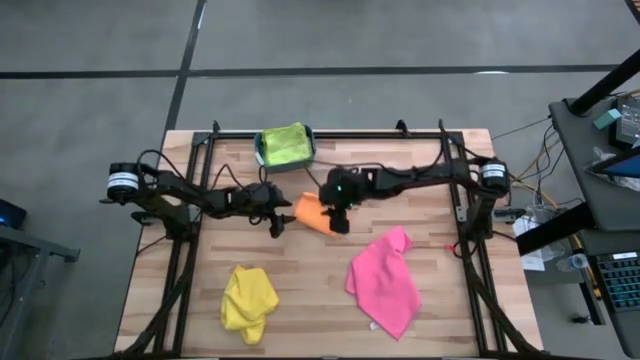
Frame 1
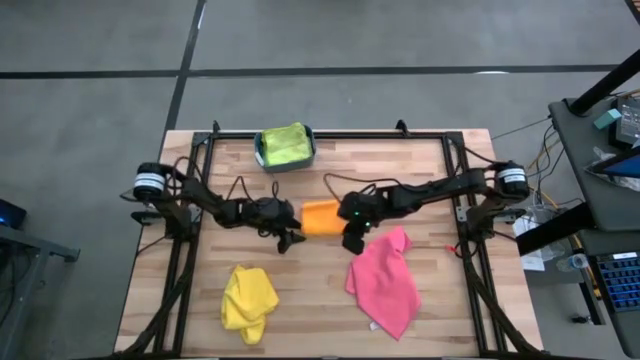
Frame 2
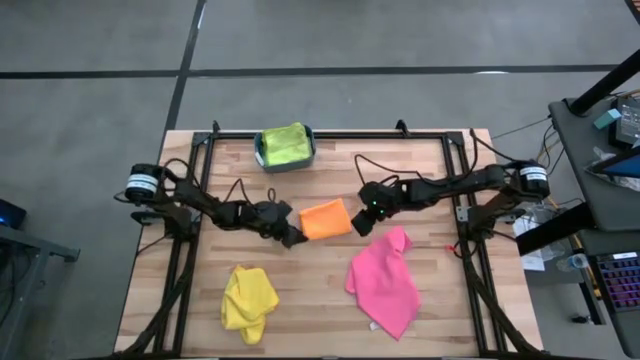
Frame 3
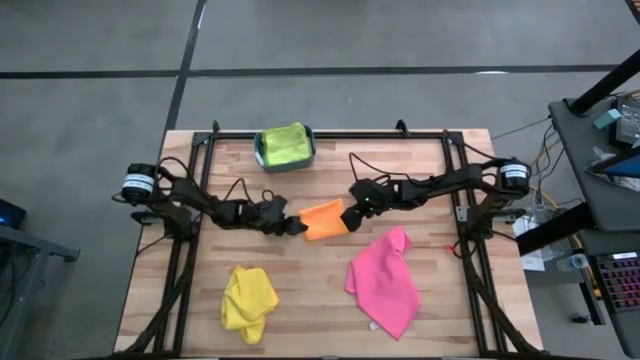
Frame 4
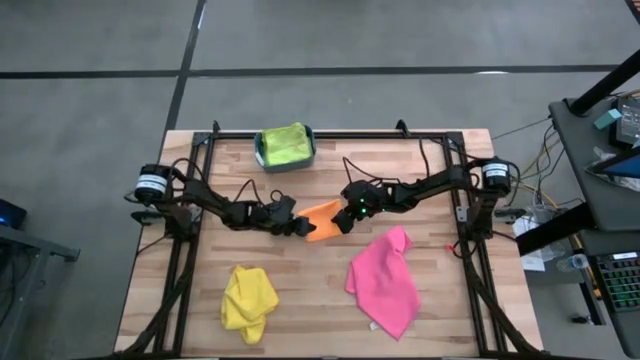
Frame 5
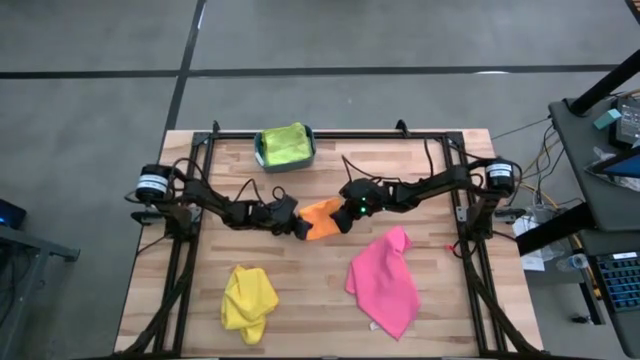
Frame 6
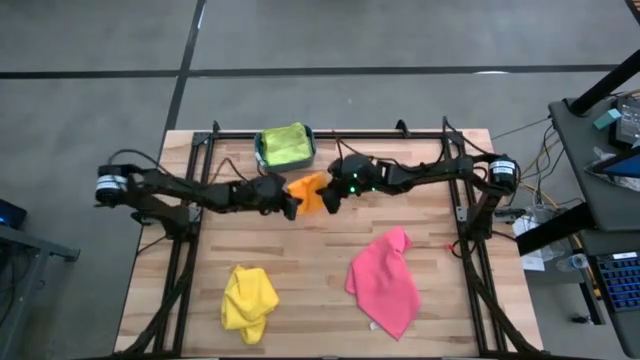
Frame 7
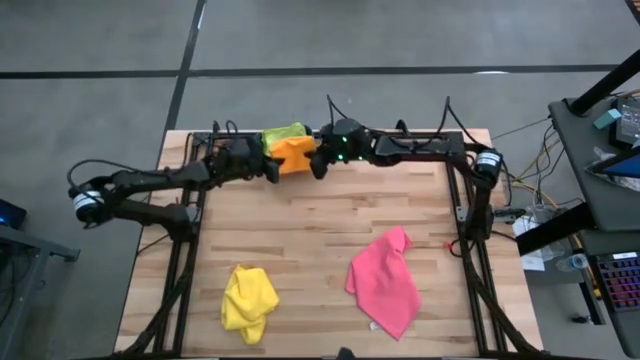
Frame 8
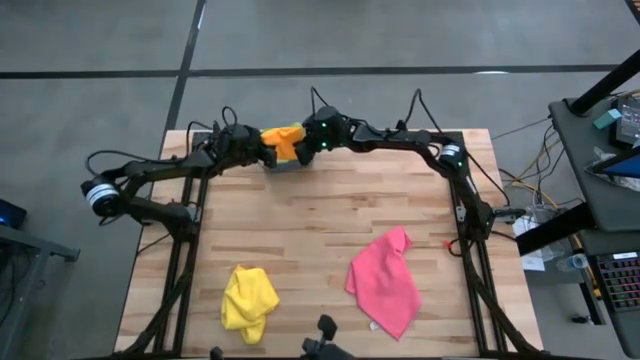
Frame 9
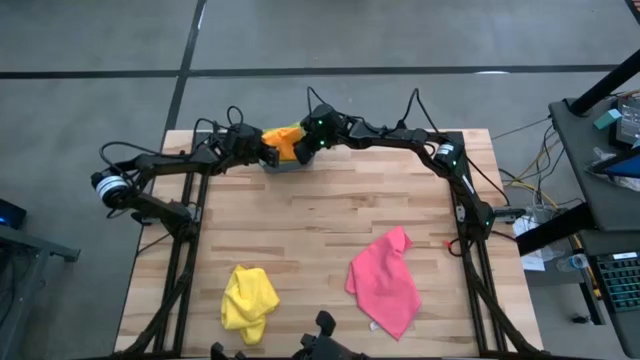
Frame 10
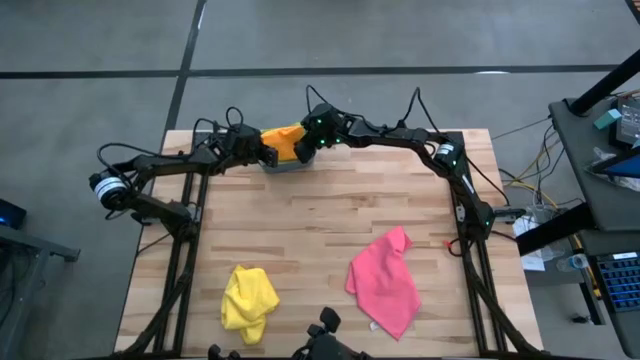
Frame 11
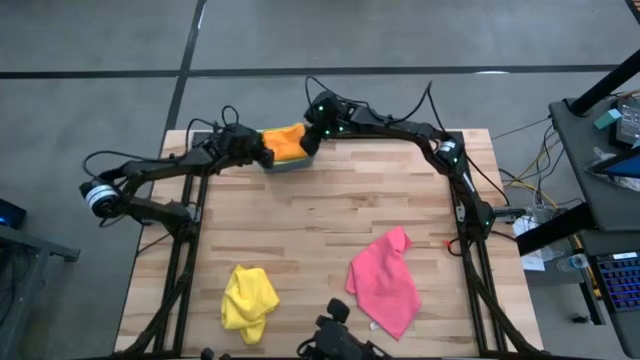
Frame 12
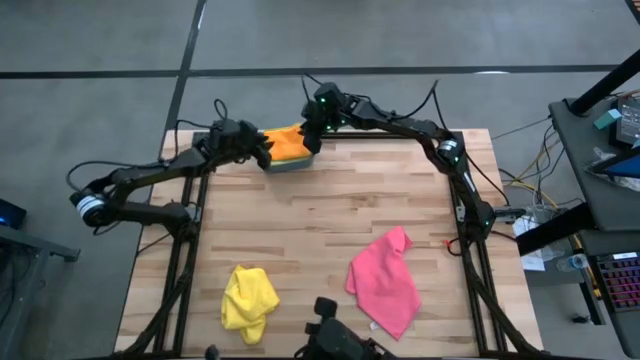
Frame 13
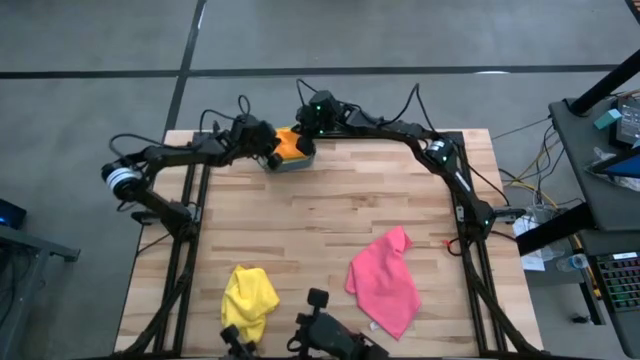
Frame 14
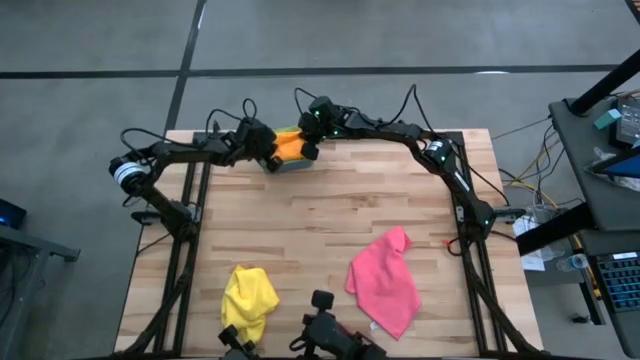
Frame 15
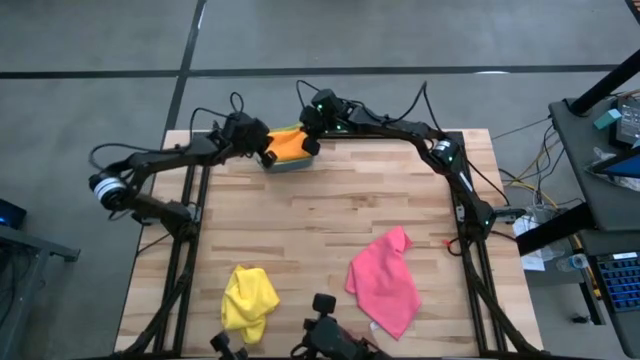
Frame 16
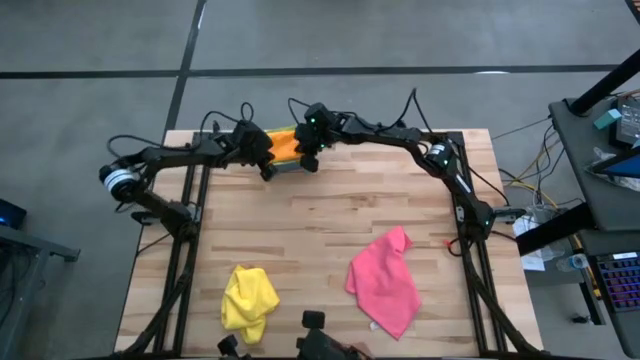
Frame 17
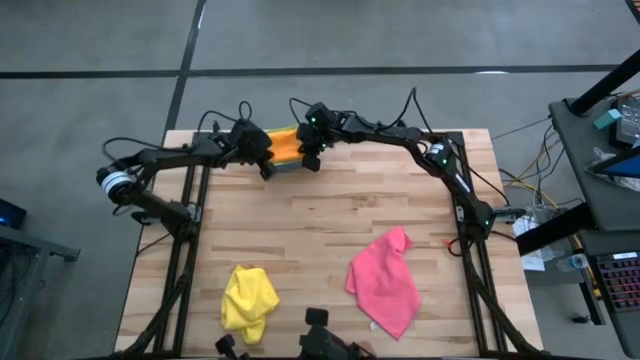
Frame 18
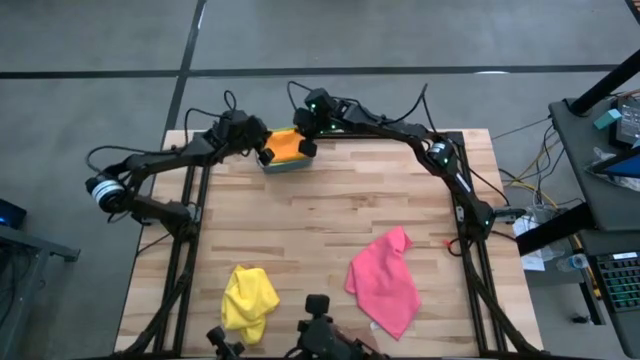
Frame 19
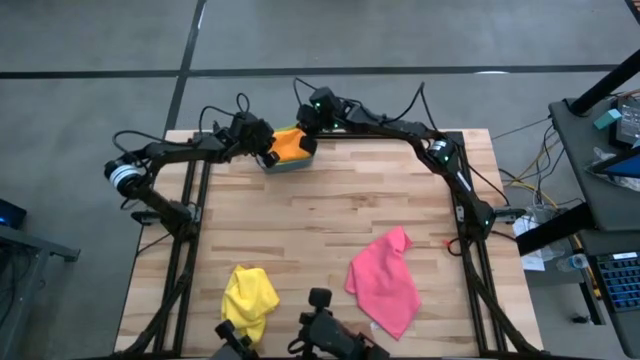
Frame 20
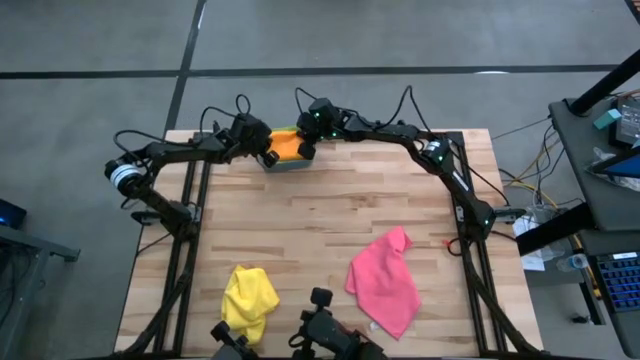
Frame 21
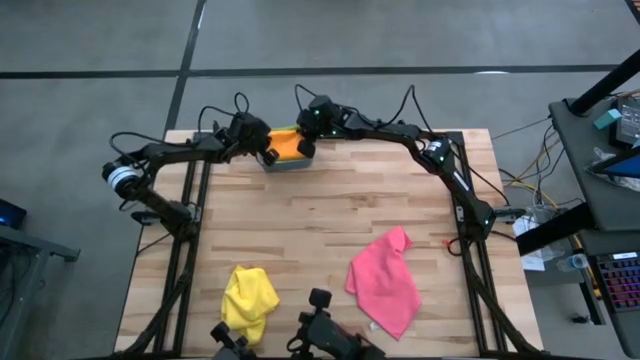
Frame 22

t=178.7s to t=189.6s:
Task: Fold microfiber towels
Put the orange towel into the bin

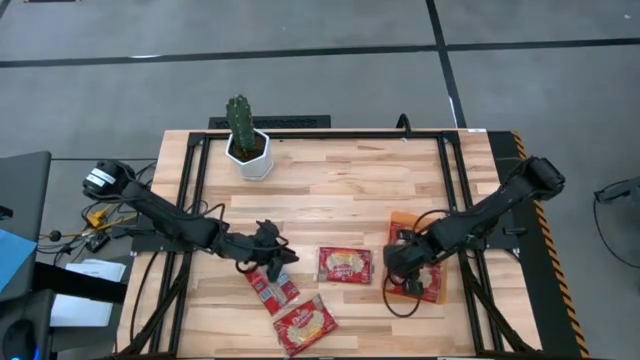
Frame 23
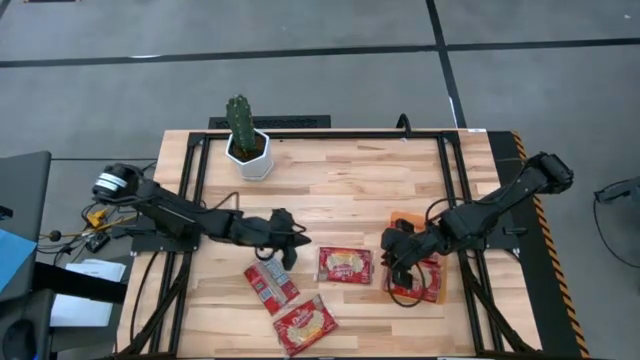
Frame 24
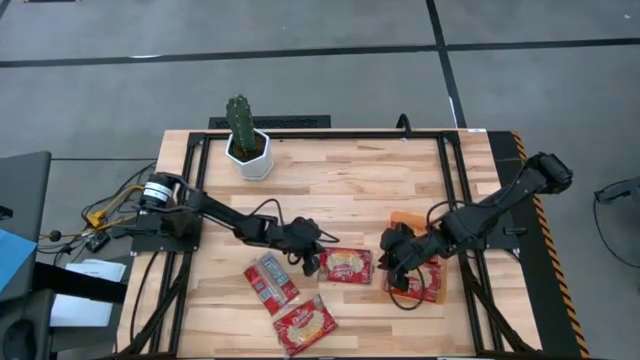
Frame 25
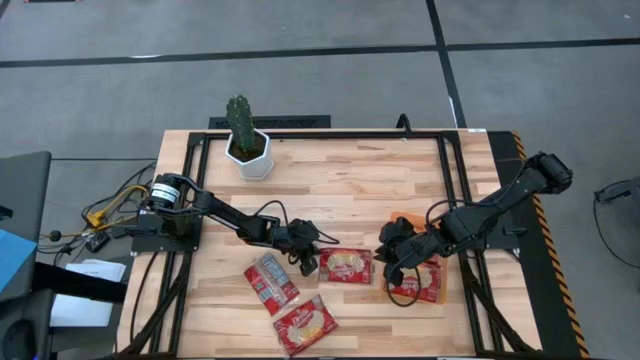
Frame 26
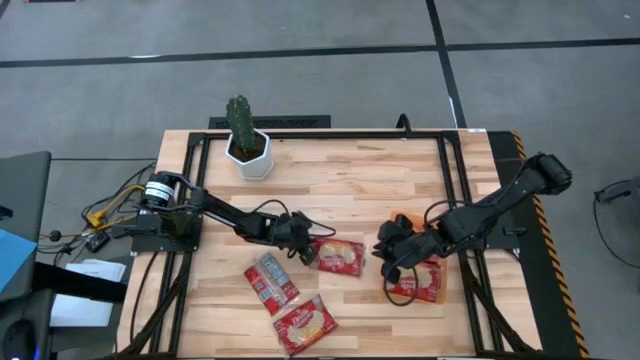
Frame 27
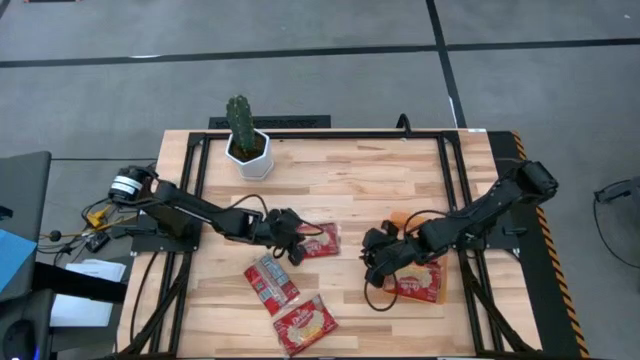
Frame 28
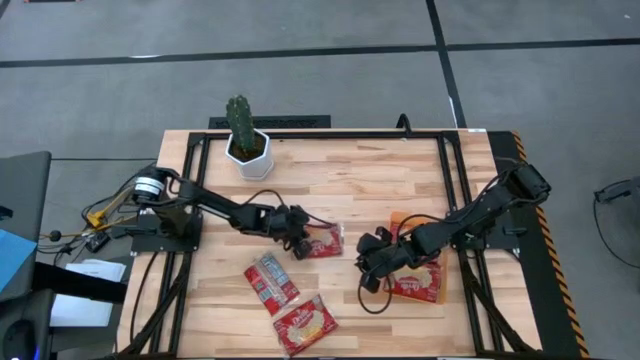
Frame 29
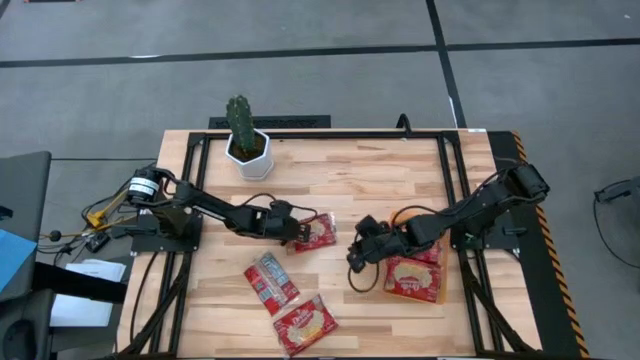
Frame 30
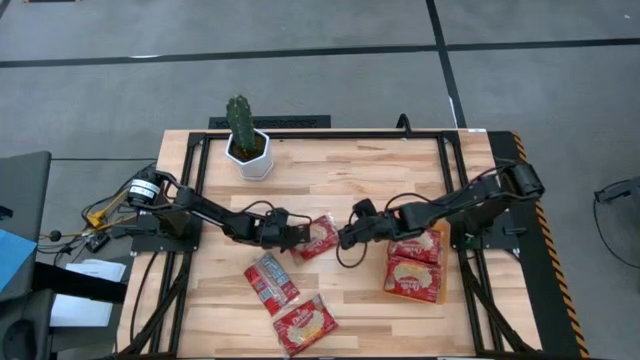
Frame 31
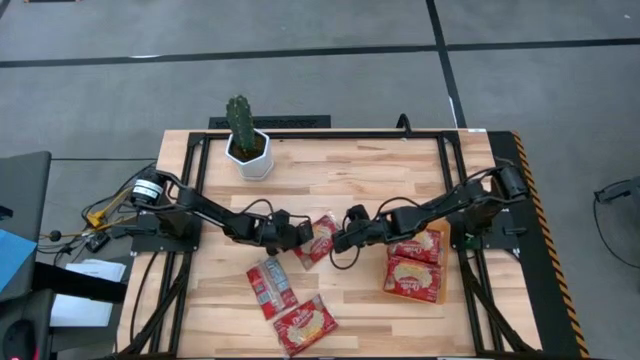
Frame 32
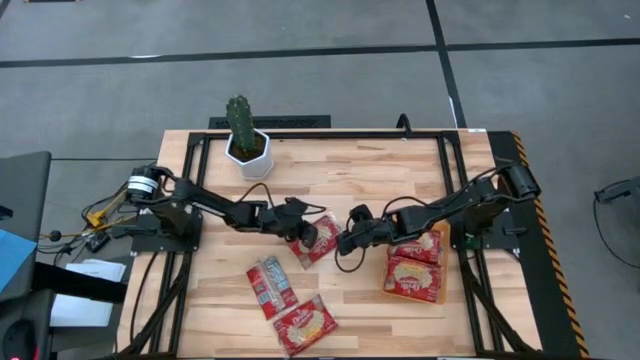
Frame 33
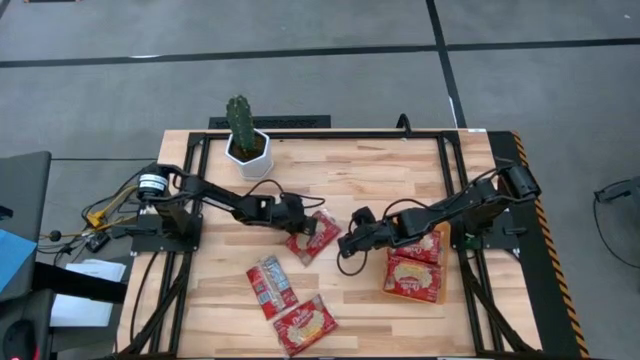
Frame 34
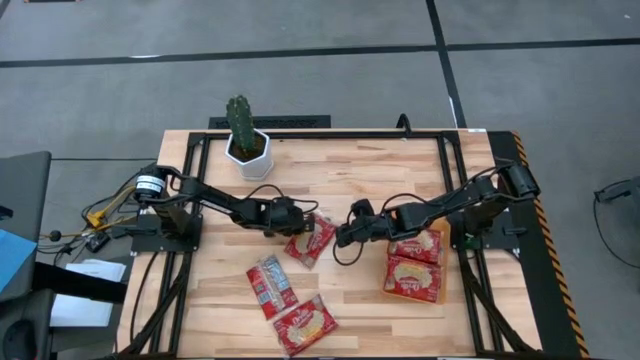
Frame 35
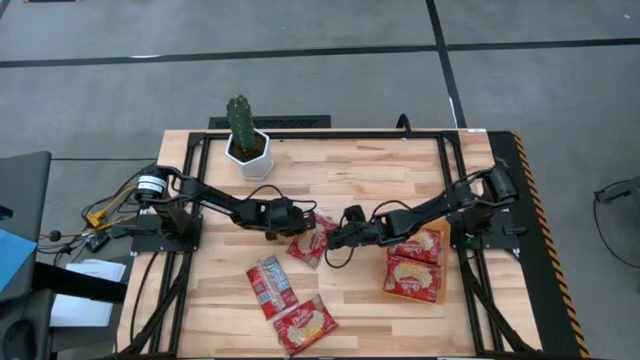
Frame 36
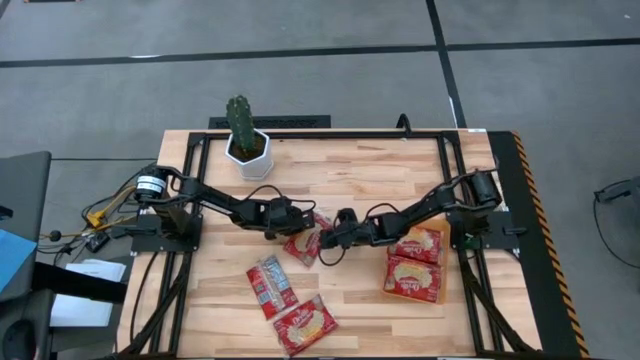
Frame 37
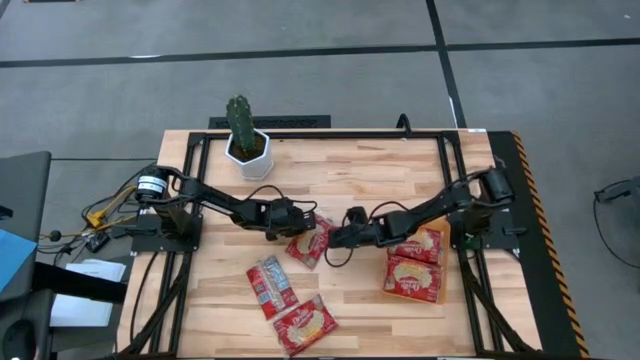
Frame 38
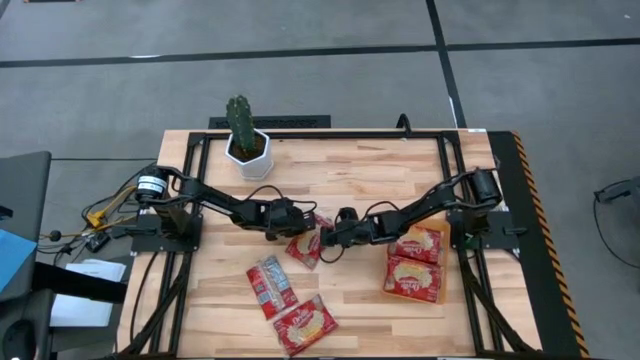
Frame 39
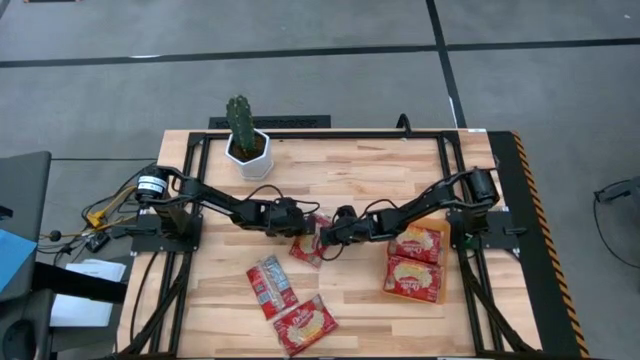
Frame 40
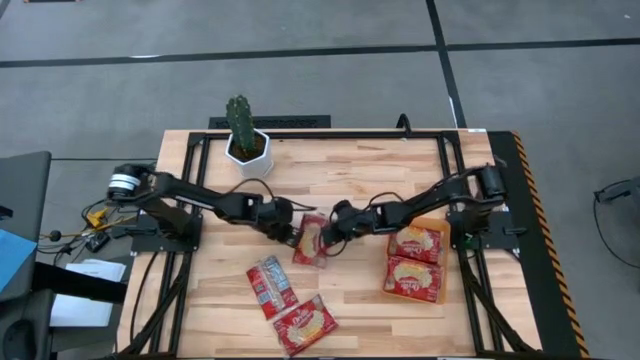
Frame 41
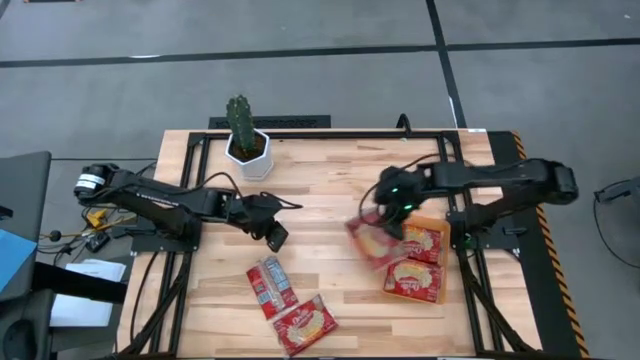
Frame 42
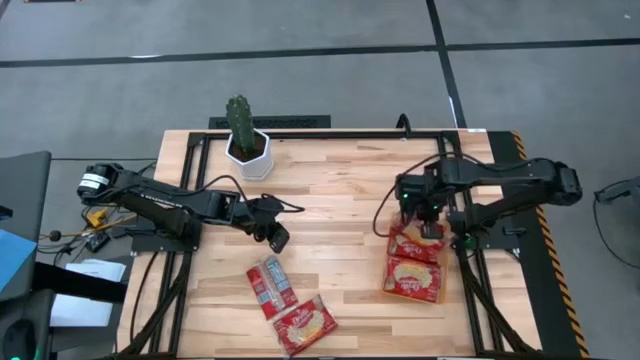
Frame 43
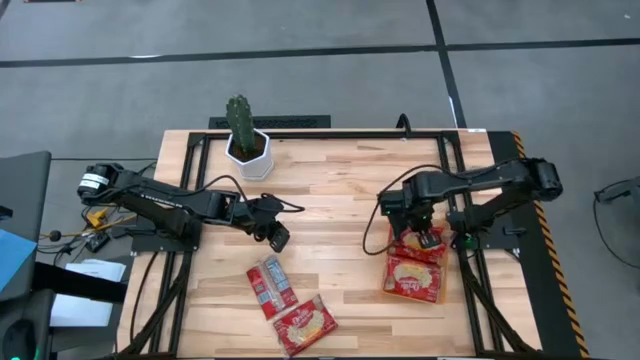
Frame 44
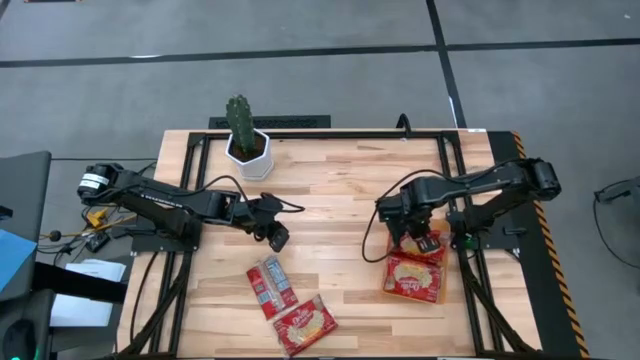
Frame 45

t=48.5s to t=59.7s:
Task: Sort popcorn bags into baskets
Put the popcorn bag into the orange bin
